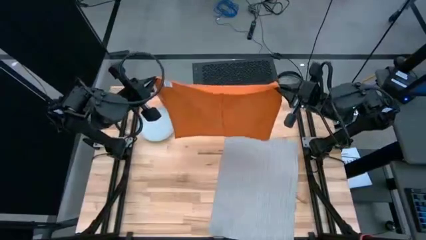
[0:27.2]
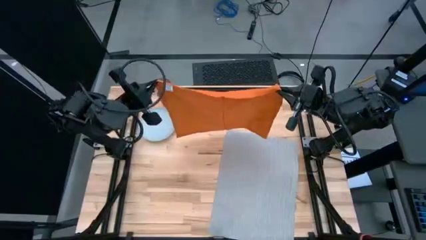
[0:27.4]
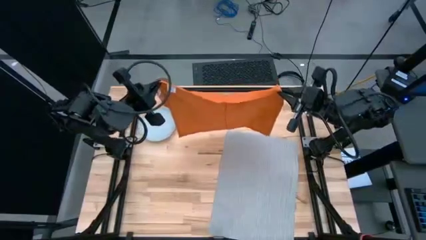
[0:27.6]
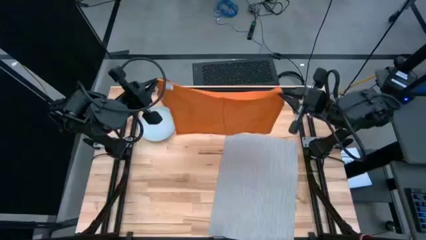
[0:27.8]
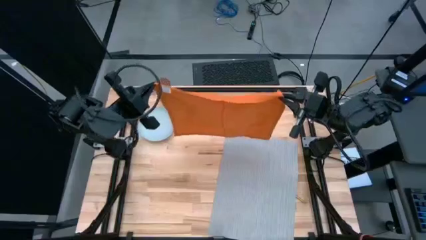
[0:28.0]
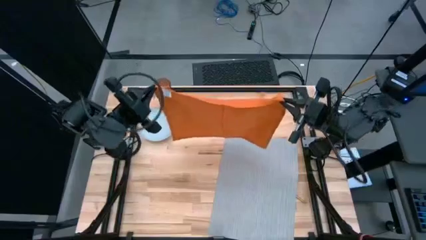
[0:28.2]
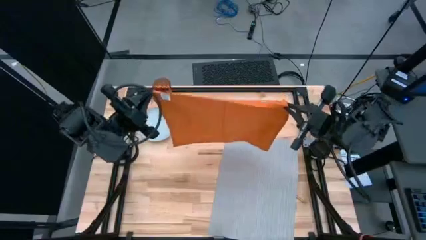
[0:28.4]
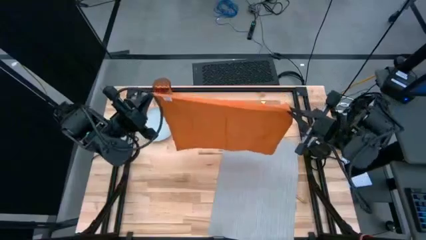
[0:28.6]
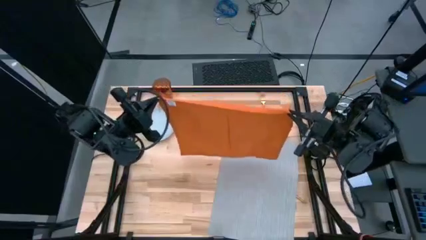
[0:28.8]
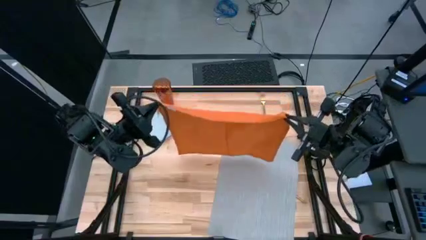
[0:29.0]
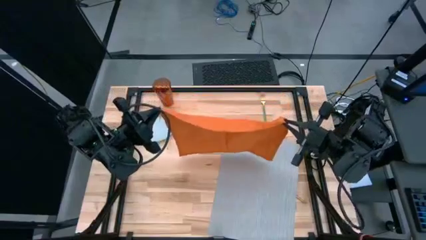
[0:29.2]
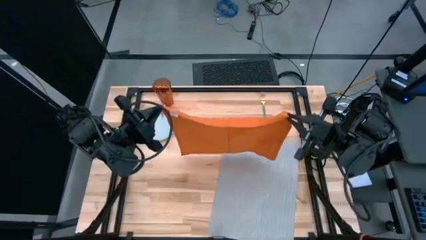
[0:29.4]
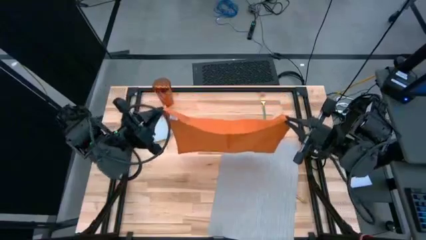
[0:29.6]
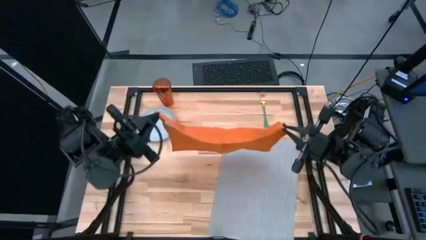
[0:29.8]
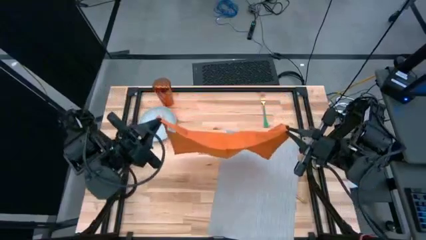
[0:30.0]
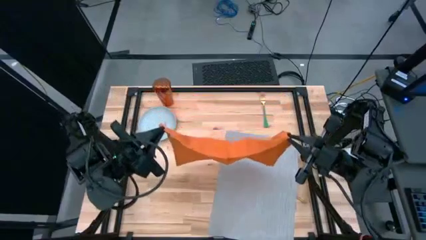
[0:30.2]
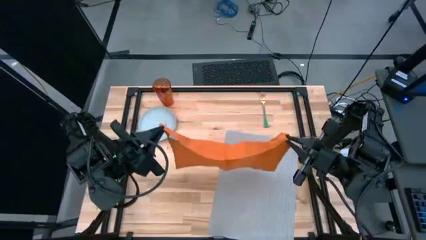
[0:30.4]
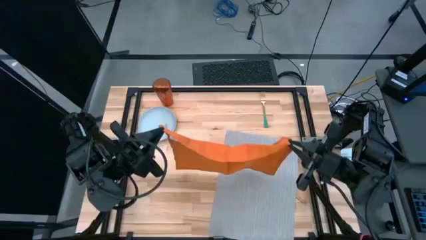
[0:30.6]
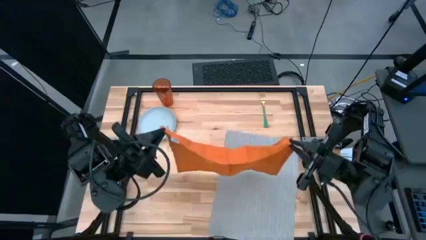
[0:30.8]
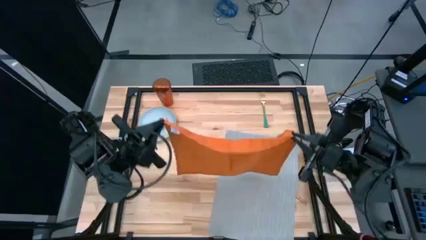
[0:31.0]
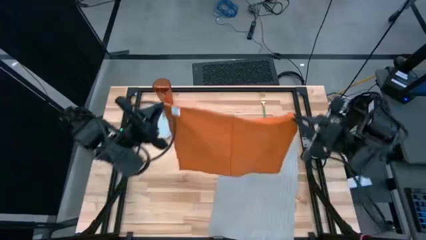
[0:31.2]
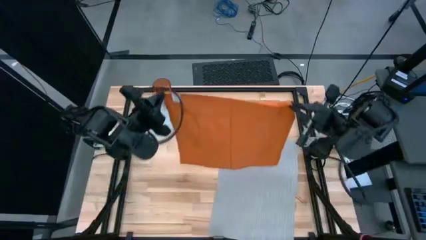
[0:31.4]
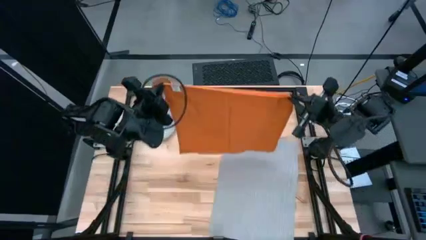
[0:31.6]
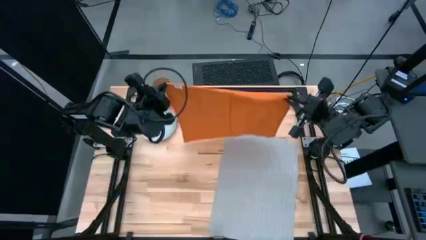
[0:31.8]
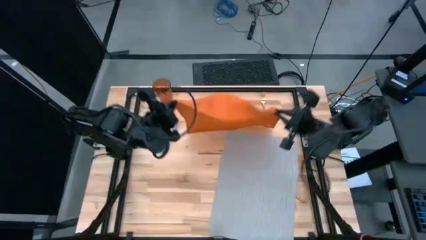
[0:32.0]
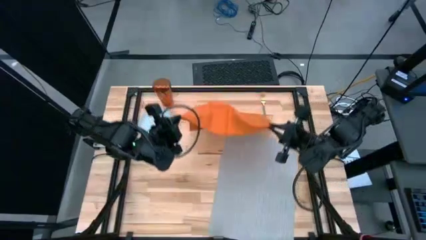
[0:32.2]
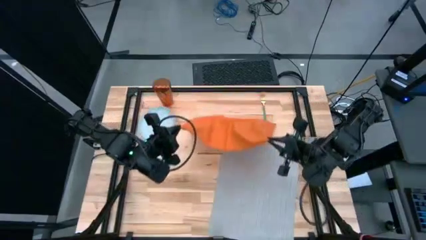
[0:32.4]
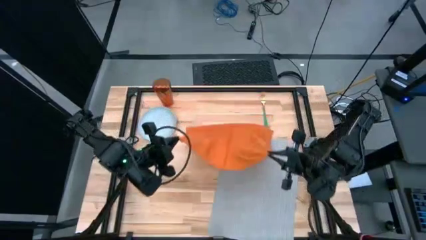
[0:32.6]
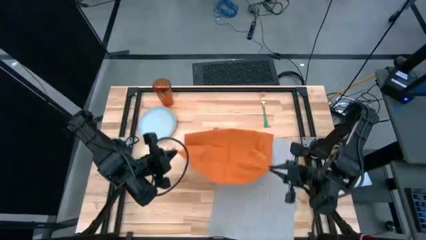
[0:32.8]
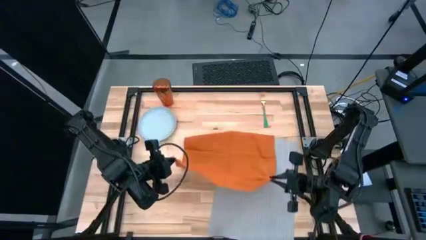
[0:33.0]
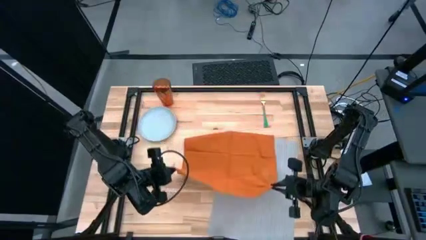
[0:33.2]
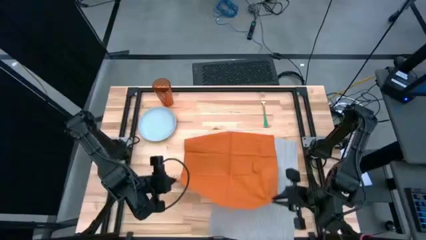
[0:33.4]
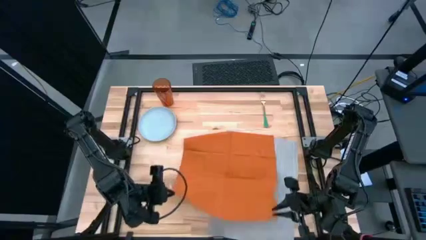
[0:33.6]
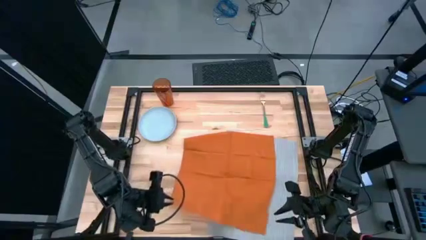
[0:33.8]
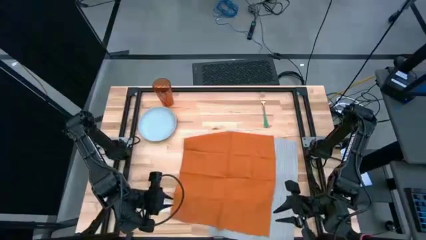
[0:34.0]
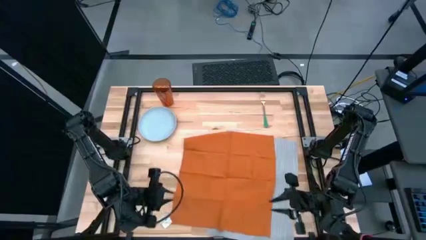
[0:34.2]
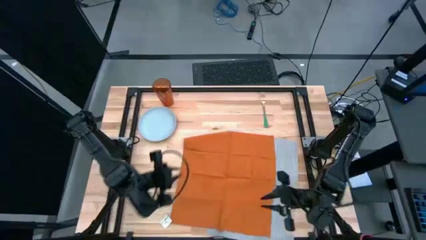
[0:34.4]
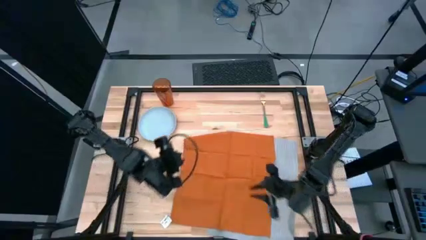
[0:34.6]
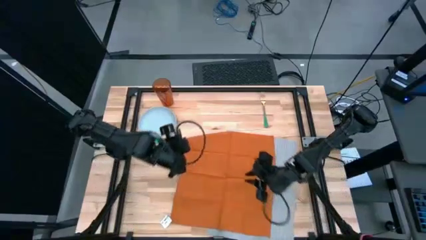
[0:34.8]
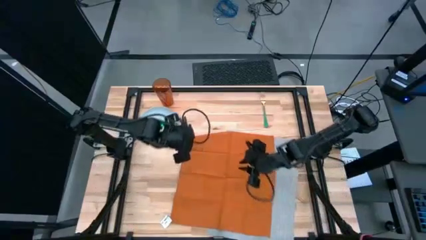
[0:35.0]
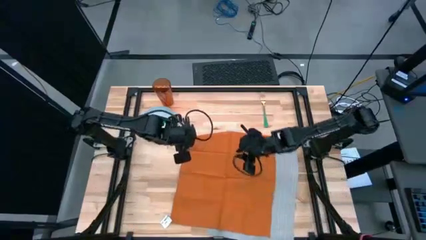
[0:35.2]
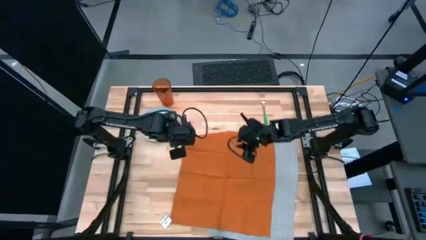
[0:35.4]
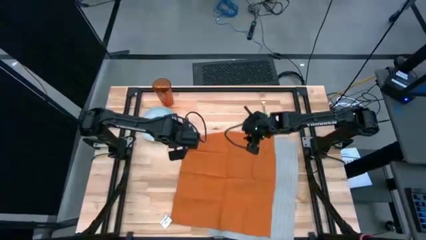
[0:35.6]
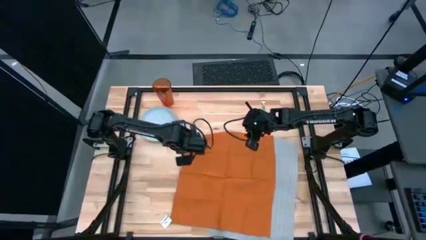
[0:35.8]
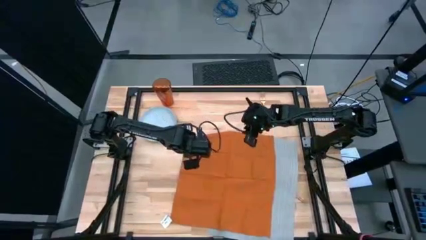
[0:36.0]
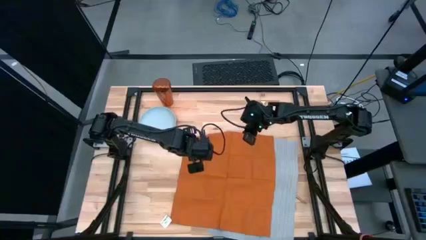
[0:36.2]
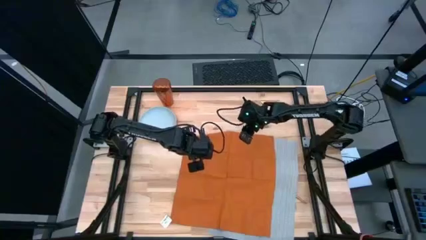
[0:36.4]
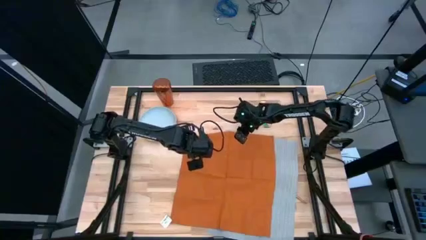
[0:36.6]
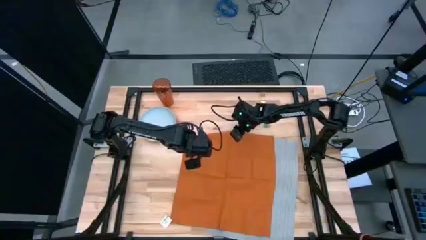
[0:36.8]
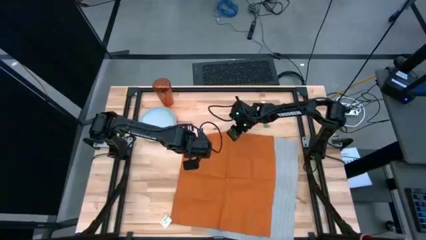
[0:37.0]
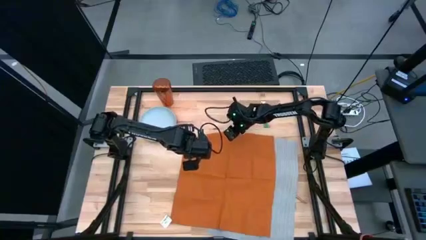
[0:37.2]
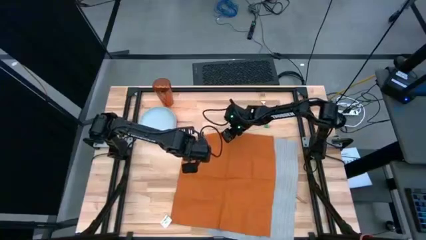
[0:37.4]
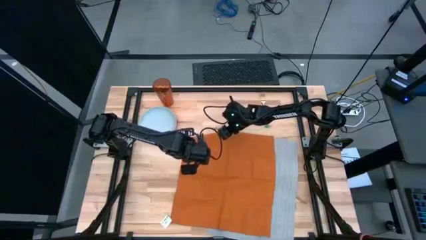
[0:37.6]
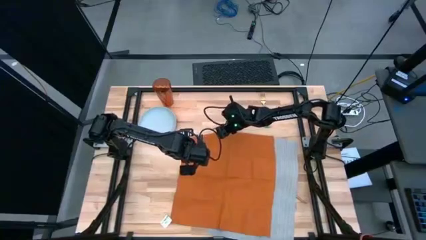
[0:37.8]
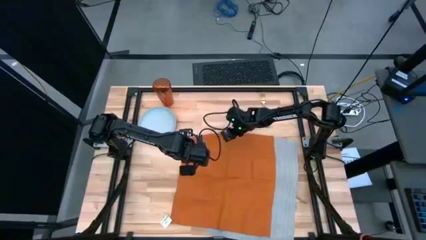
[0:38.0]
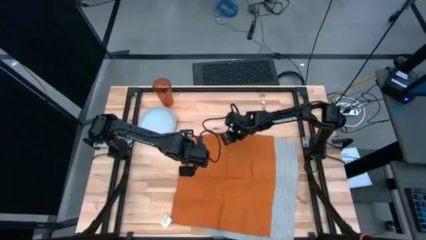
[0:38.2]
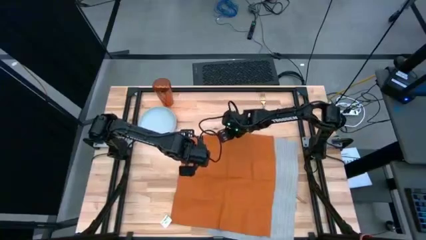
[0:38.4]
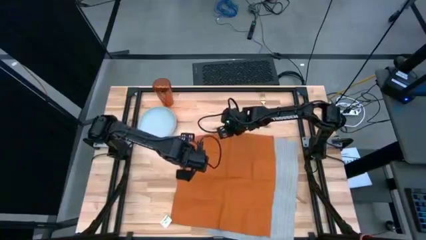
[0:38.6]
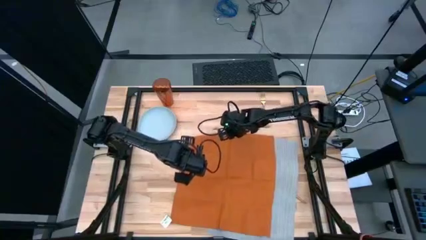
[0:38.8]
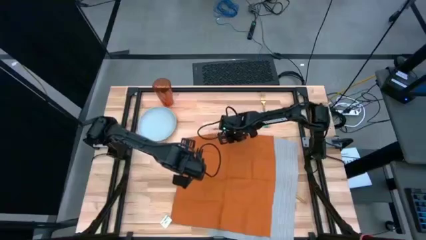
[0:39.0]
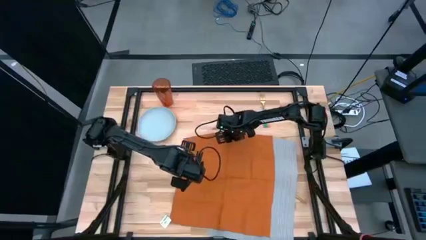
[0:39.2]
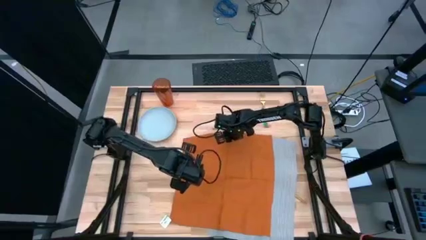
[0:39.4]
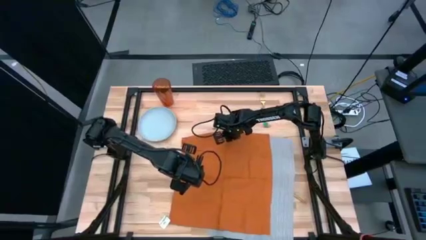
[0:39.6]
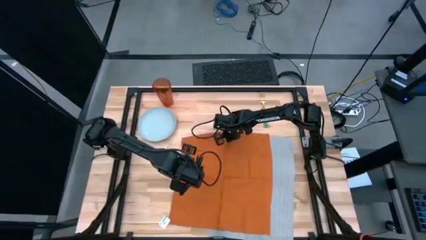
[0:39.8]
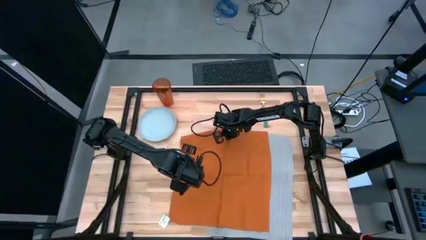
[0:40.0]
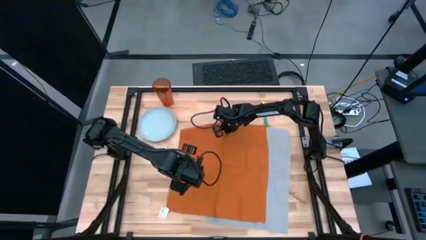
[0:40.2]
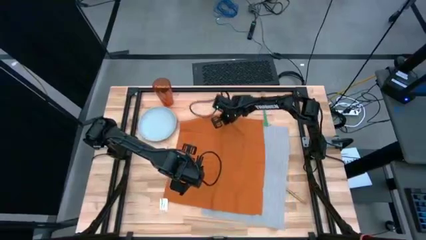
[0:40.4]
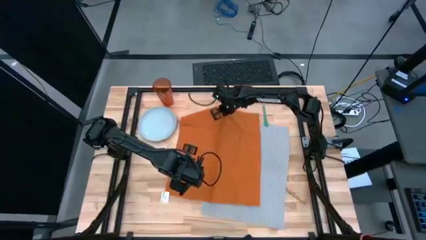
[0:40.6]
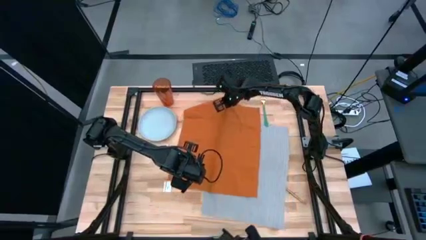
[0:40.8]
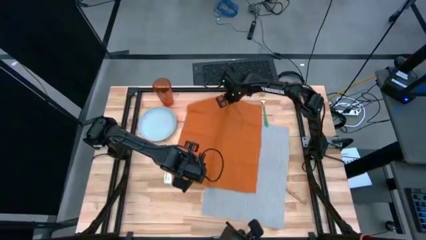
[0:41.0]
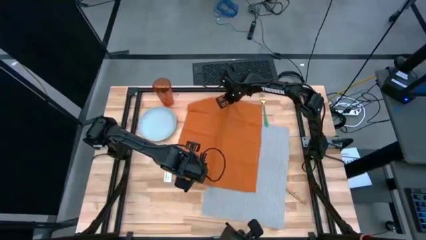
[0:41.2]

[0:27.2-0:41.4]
Task: Set table place
Fold the orange napkin

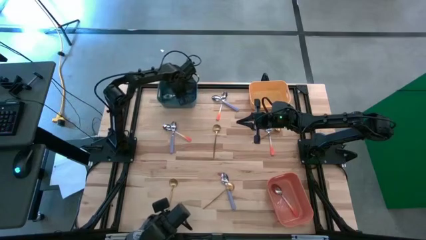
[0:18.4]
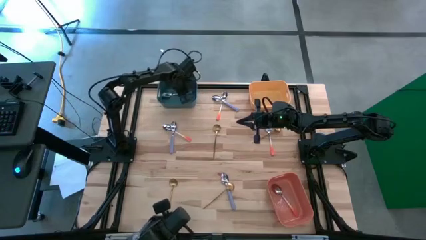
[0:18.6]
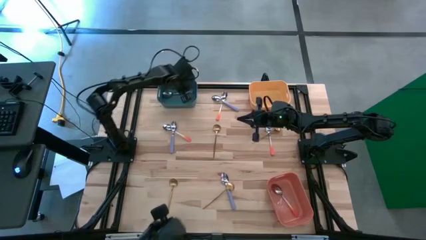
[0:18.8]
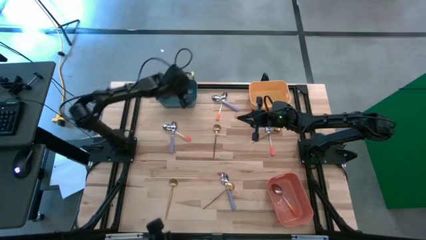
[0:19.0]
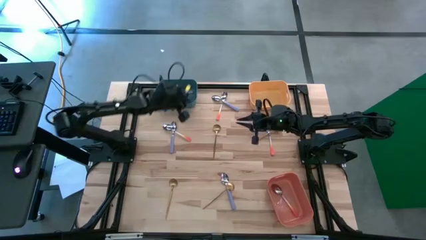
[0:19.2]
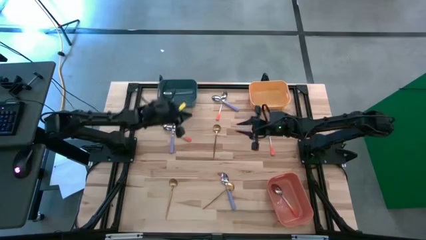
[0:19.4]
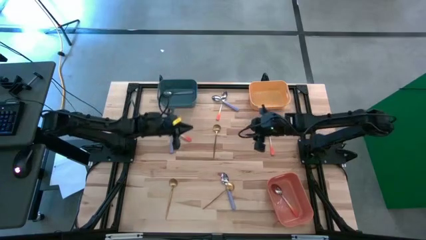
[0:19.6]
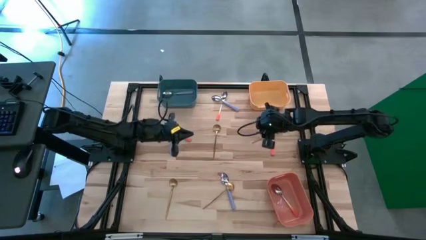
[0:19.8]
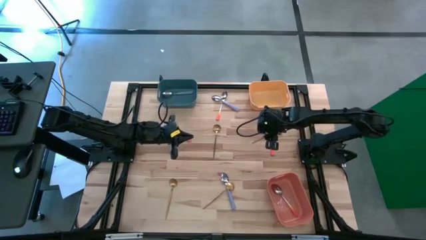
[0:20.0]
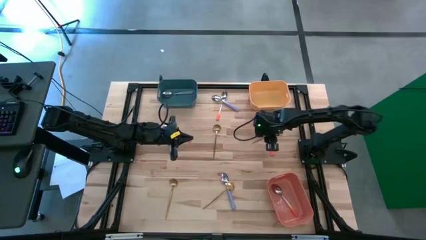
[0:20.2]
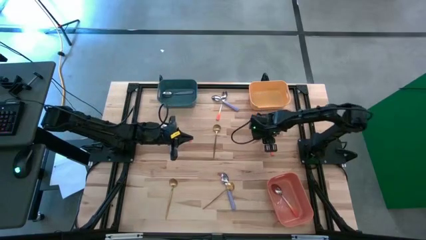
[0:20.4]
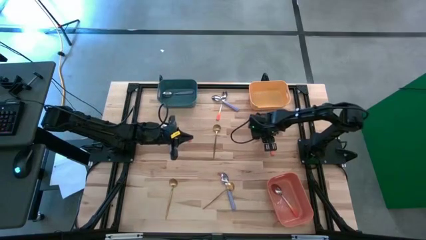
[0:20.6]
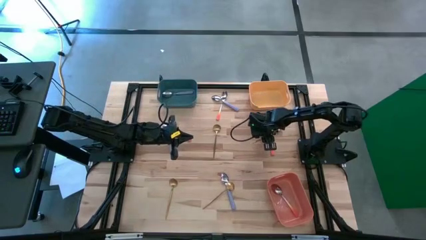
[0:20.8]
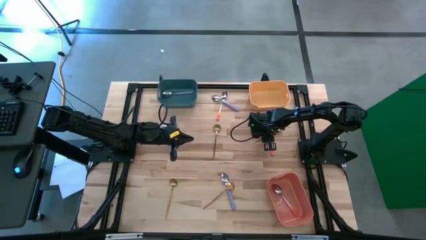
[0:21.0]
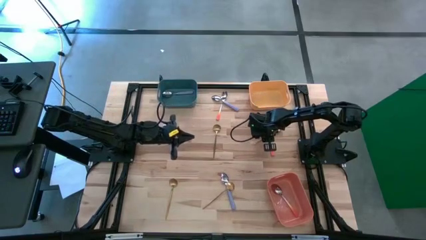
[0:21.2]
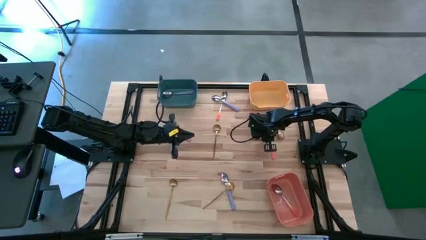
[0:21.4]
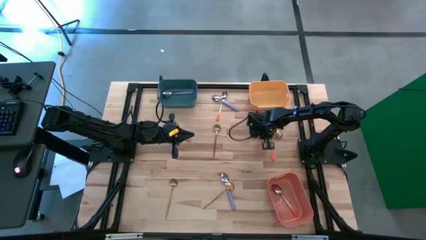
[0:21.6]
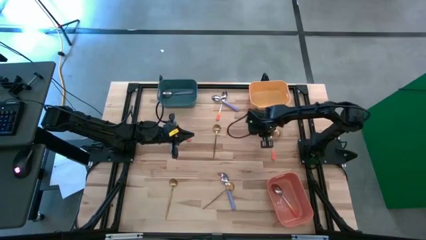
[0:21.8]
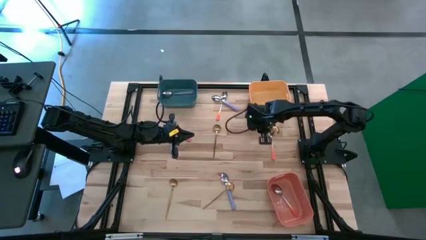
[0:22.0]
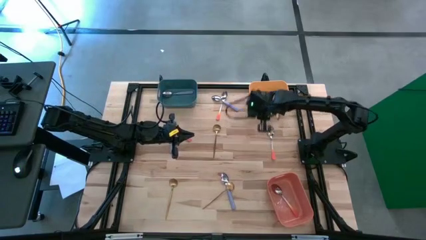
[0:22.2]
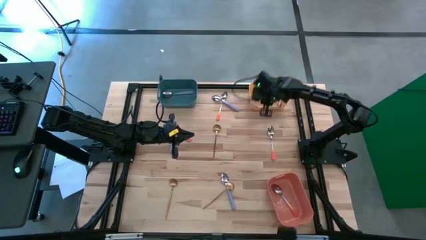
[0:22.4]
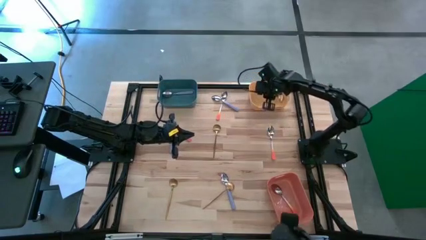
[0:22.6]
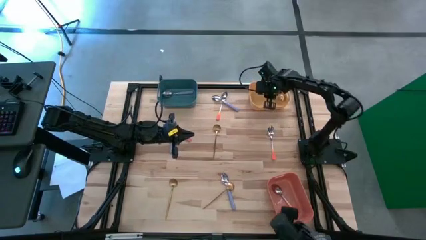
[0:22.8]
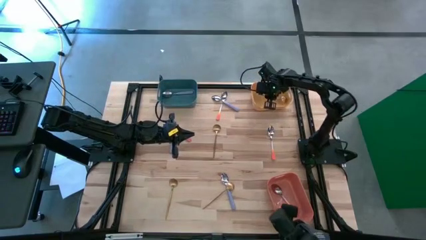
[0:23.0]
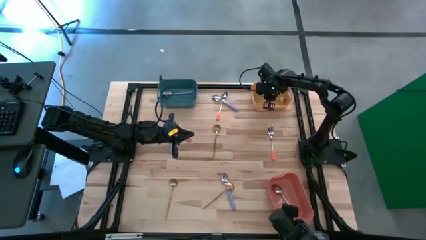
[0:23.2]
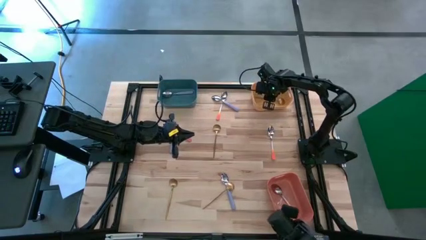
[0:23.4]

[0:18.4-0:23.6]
Task: Sort silverware by color (type)
Put the middle right gold spoon into the yellow bin
